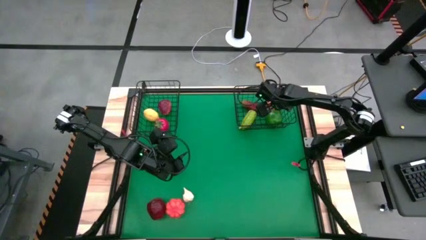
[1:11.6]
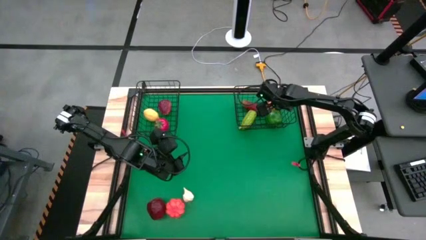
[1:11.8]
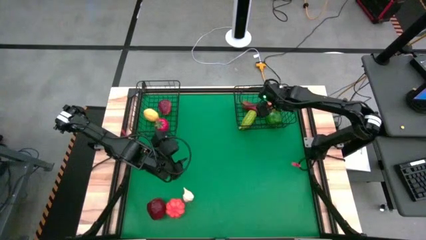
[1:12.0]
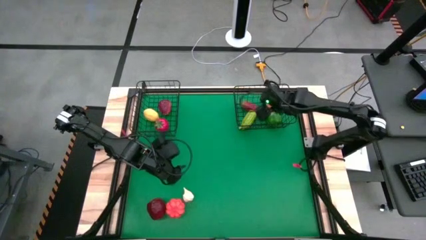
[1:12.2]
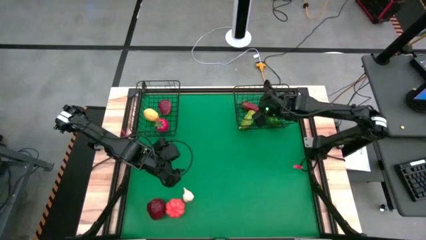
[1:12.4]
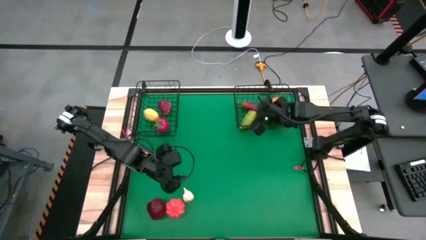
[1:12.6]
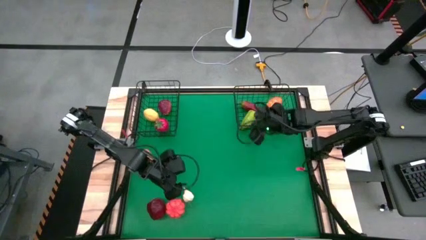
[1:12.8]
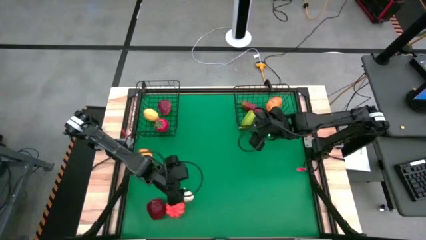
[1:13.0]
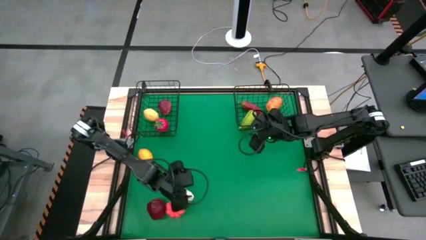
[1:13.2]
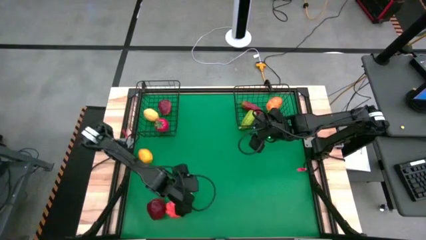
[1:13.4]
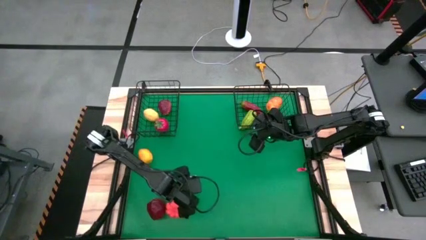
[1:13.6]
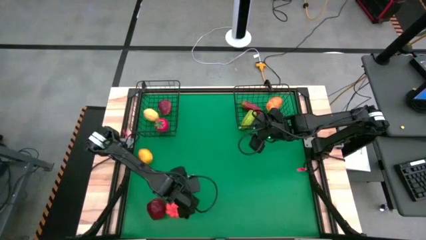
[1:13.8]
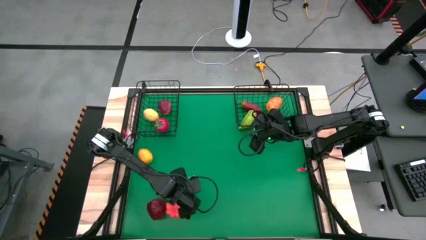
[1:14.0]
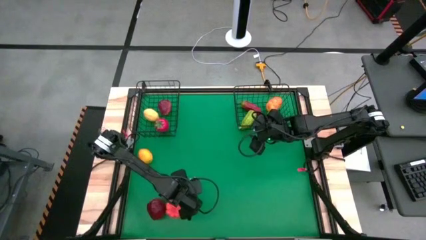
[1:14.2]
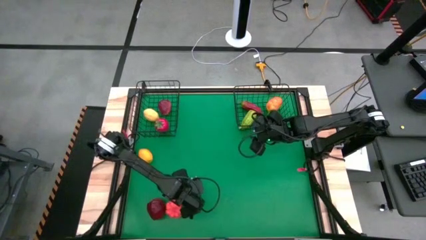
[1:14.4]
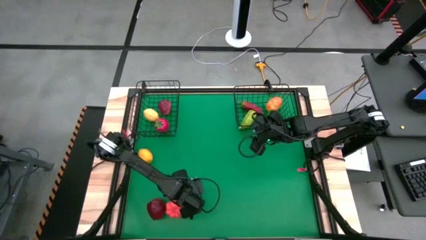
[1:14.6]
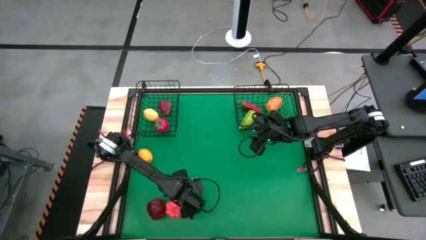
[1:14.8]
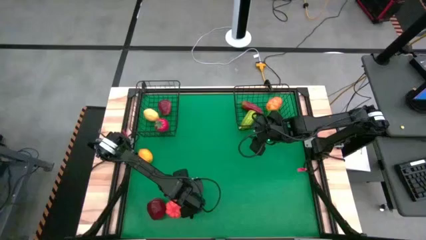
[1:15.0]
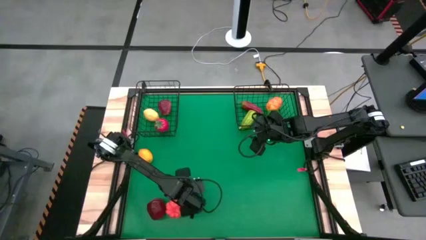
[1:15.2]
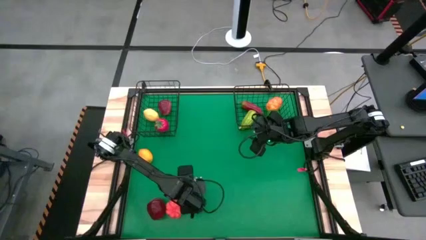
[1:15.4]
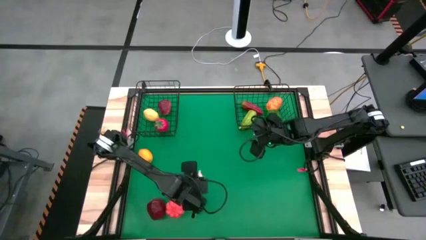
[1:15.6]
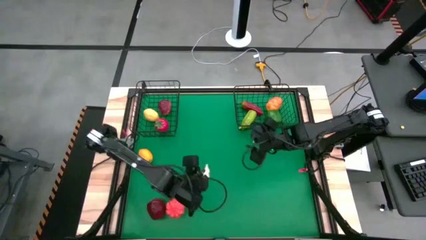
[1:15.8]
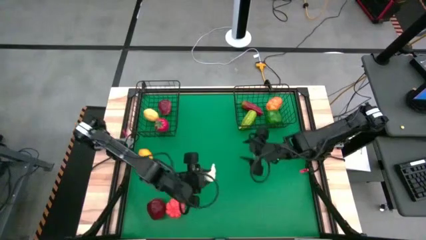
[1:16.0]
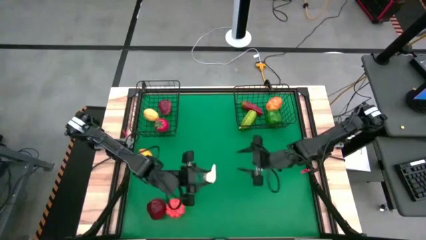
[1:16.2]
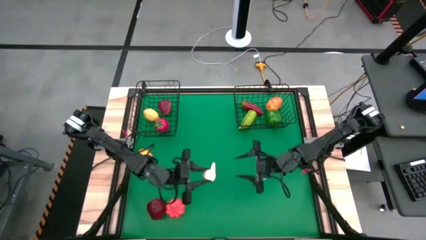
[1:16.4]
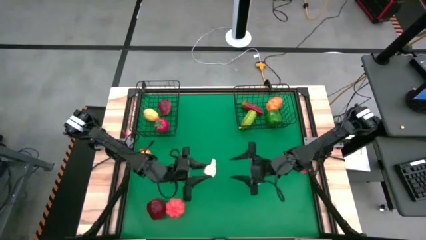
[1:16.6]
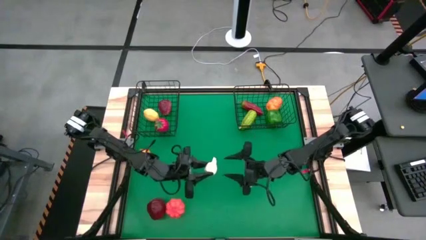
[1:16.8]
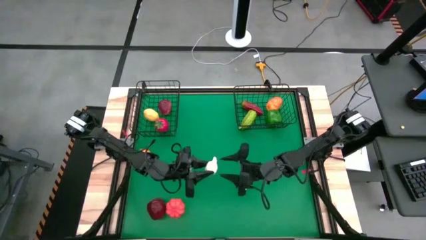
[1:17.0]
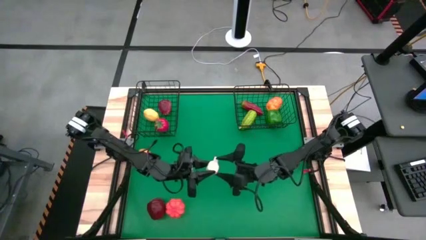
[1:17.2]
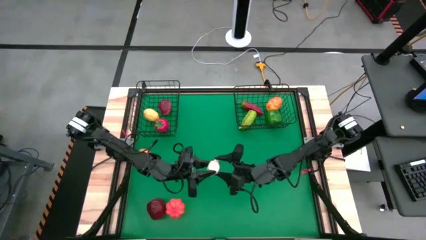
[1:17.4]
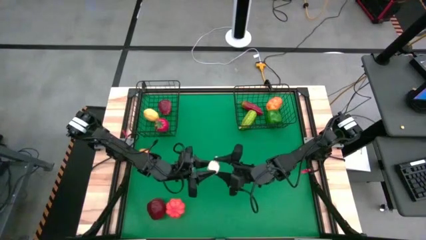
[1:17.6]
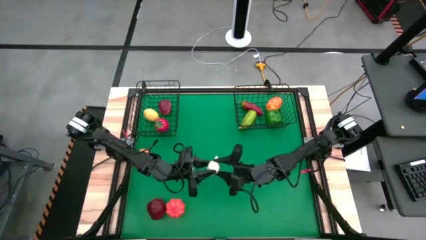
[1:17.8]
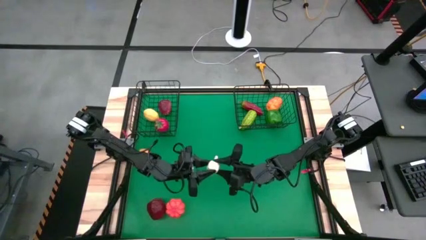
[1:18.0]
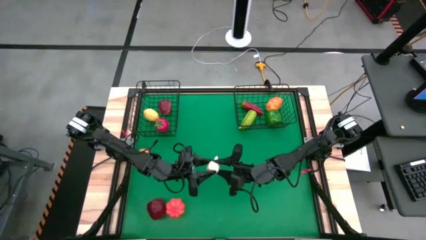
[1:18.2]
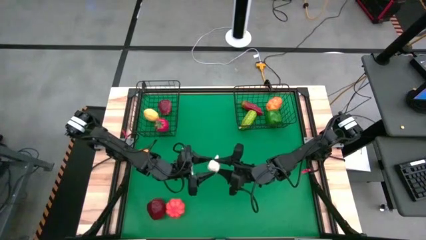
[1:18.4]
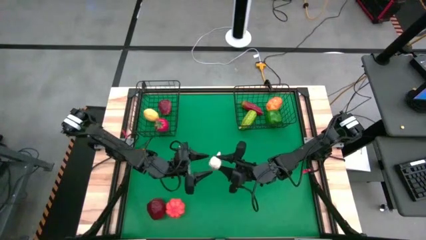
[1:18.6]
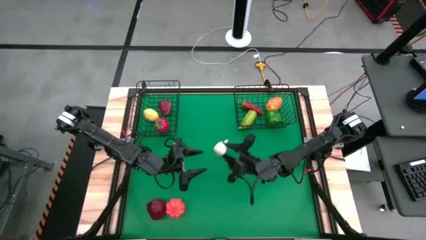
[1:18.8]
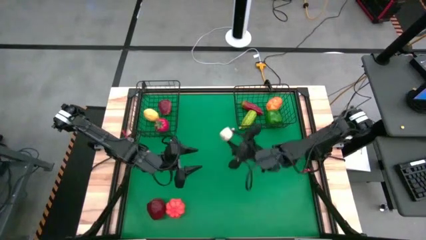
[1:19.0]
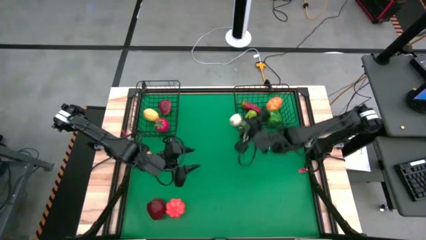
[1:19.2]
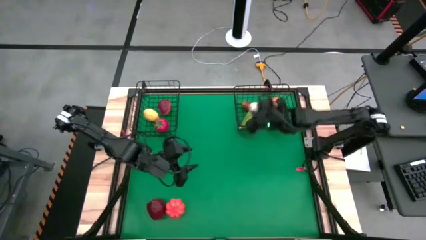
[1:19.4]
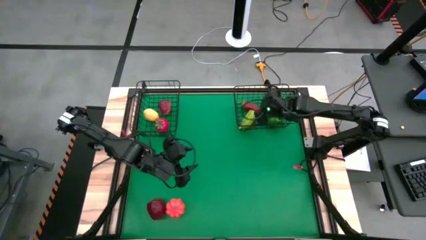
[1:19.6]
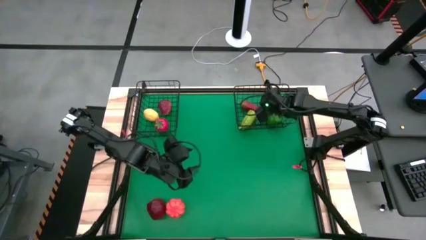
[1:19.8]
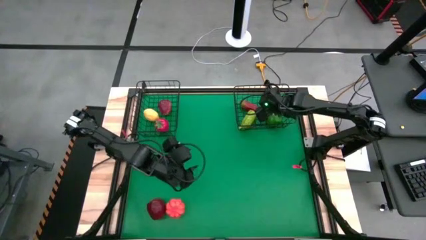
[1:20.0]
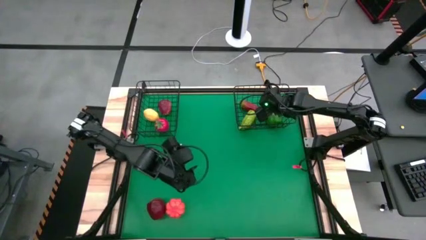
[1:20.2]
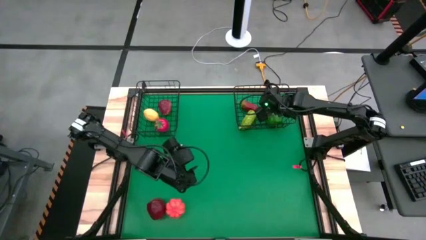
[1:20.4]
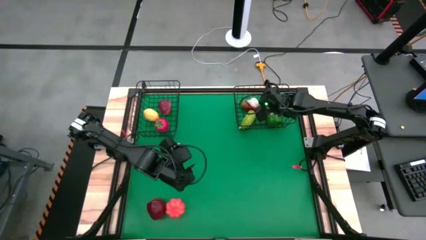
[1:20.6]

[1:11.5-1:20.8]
Task: Sort produce into baskets
Put the white garlic into the right wire basket

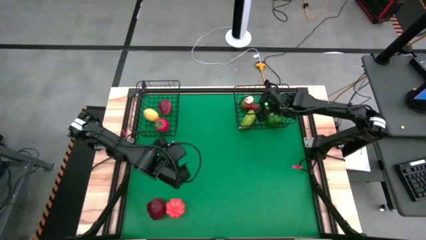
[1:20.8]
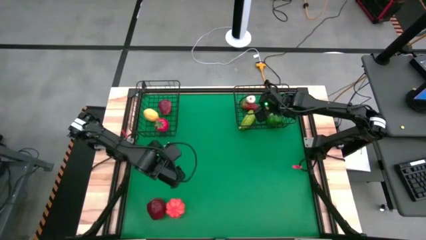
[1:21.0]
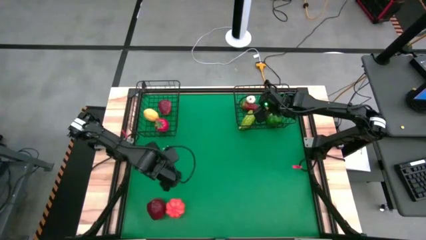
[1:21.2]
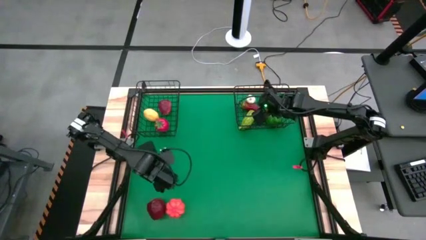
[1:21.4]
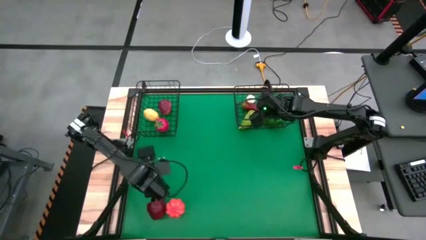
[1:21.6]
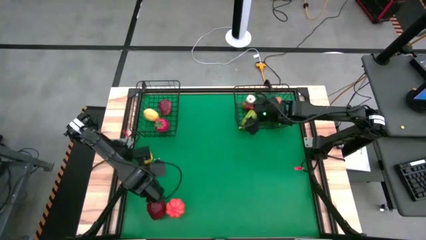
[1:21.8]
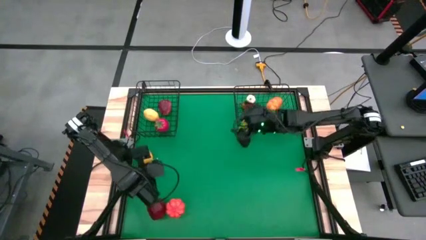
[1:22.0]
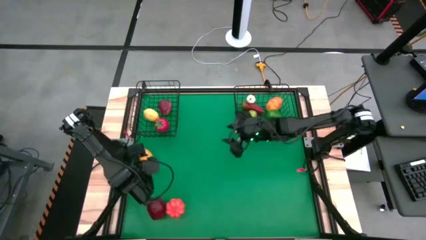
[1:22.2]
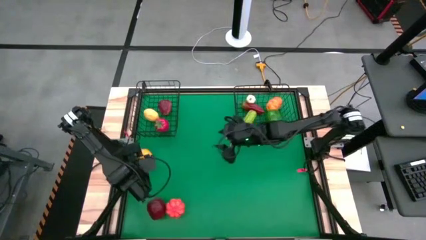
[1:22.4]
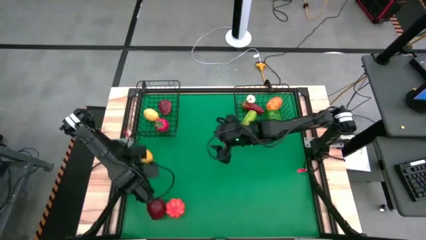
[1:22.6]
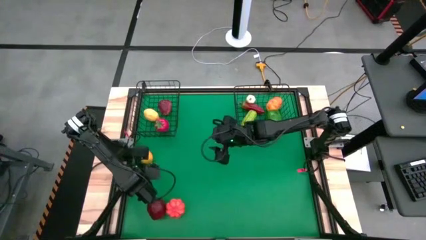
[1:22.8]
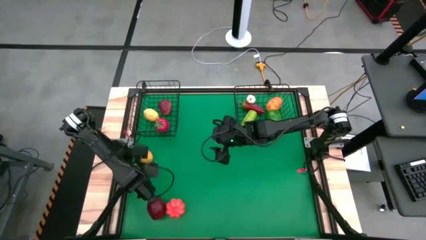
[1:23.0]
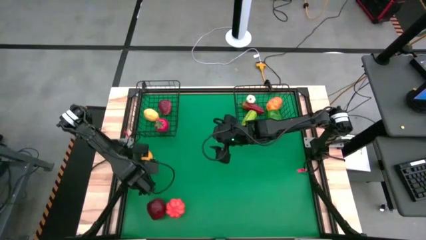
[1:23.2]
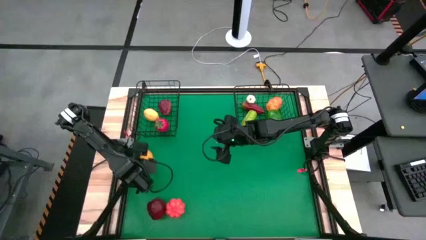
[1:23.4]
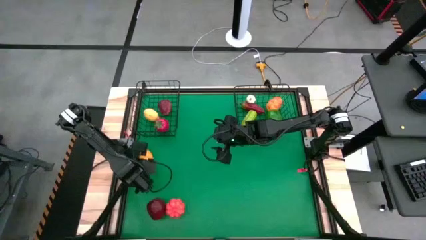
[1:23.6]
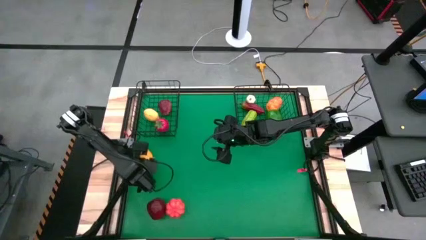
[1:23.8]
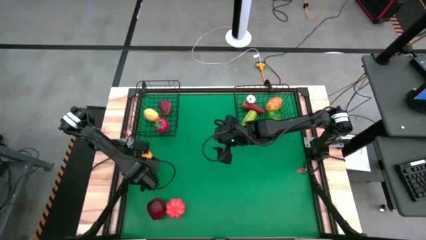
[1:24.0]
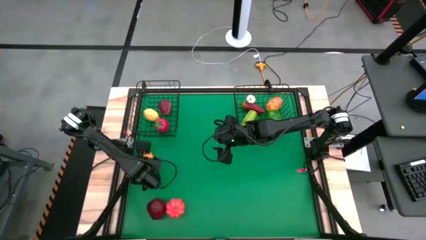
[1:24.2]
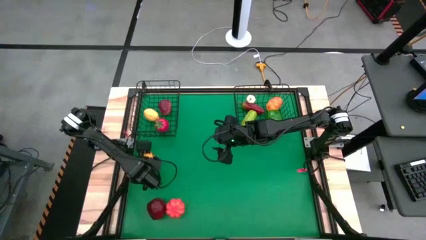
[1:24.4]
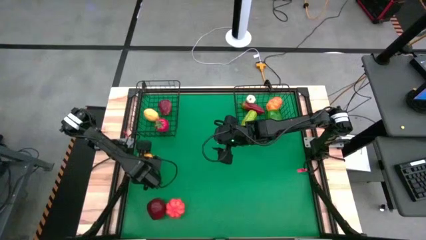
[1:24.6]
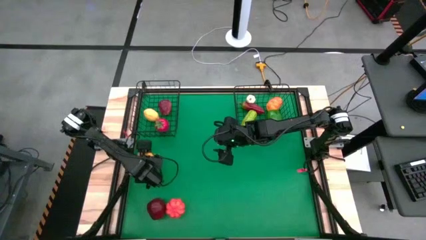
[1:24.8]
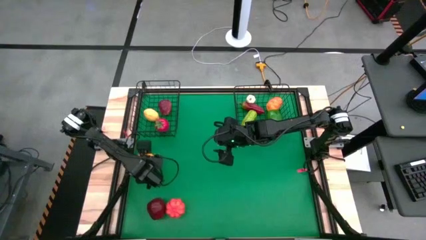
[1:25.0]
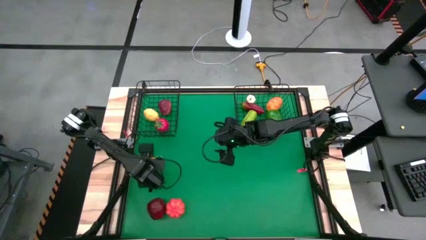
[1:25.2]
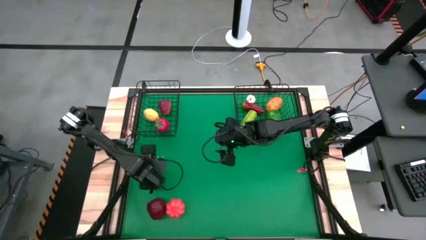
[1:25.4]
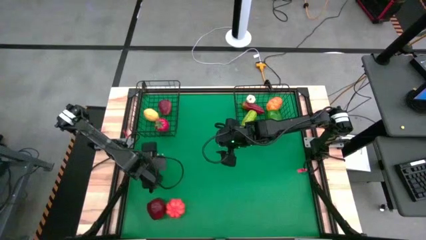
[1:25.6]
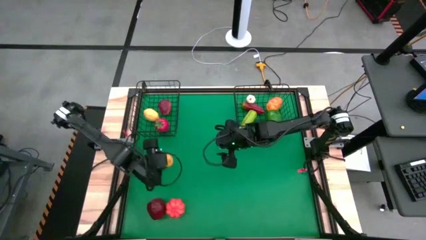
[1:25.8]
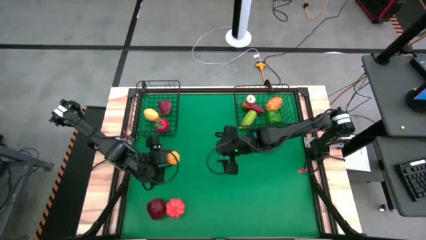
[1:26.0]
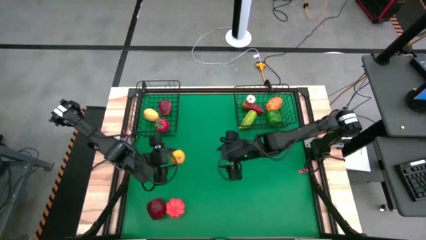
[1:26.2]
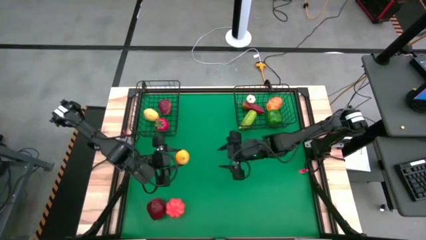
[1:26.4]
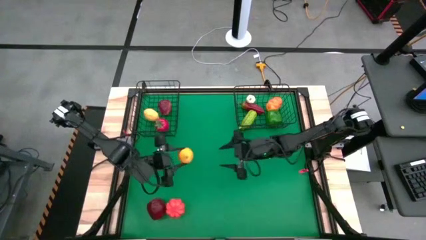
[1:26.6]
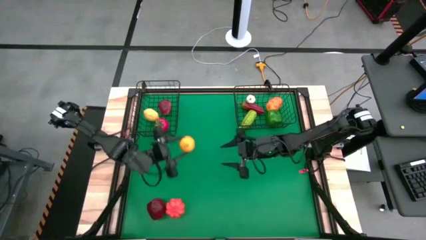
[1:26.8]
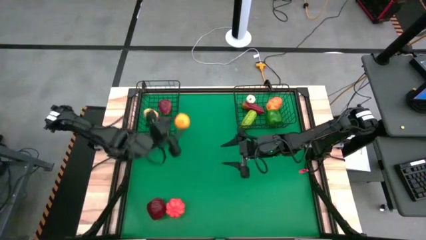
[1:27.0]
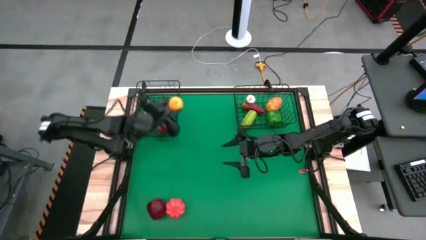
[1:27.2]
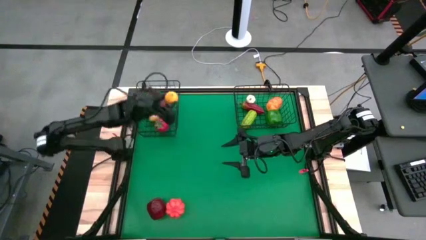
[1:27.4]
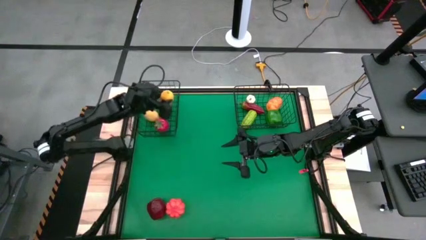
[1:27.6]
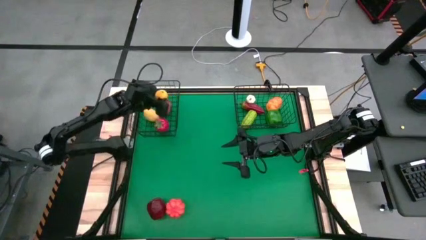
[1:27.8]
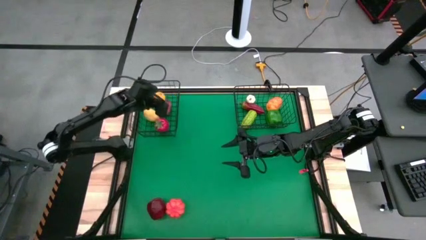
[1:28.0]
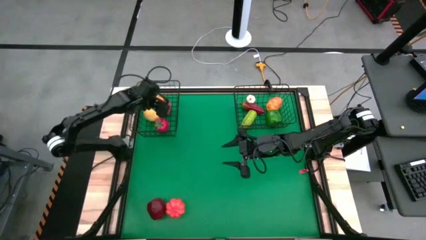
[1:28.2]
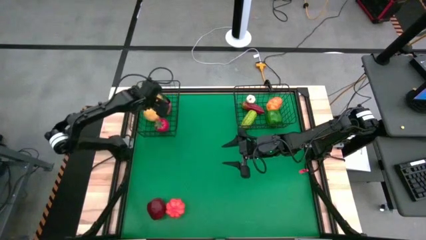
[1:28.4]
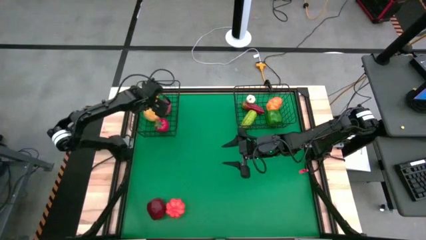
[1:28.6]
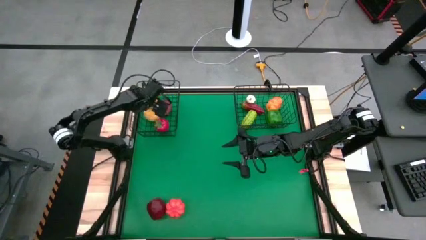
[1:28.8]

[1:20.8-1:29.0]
Put the yellow lemon into the left wire basket
